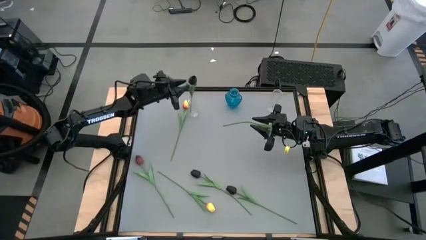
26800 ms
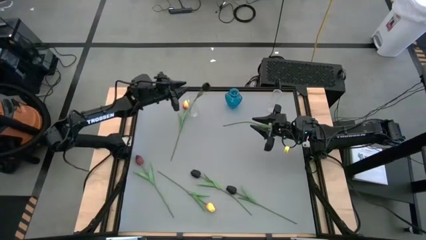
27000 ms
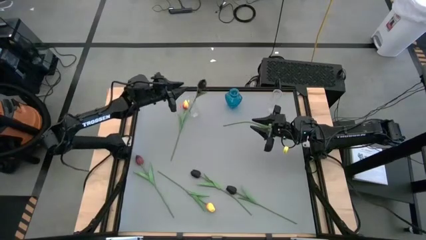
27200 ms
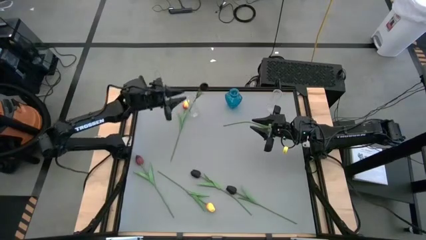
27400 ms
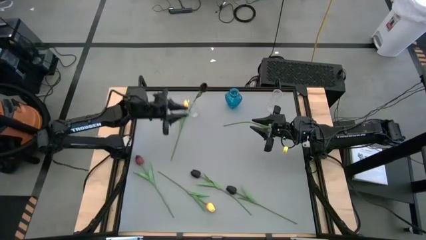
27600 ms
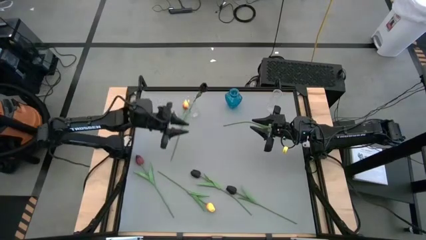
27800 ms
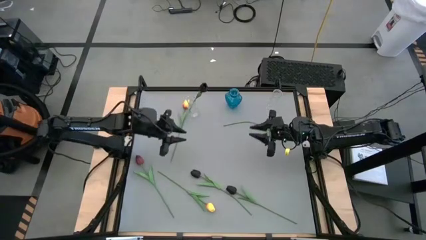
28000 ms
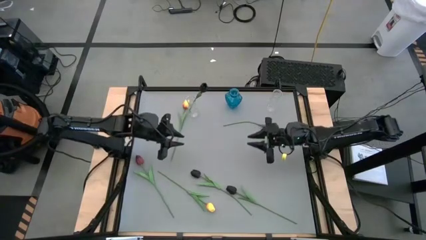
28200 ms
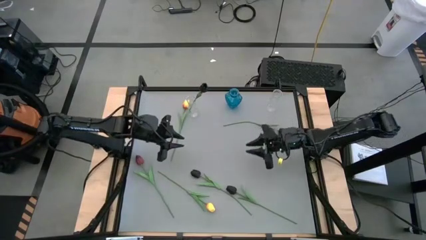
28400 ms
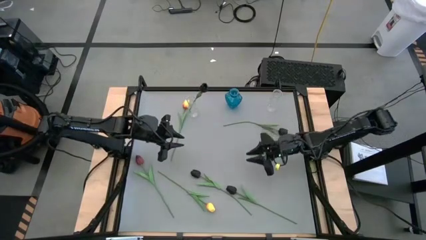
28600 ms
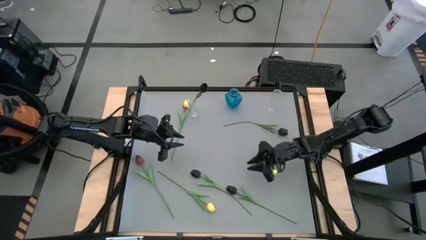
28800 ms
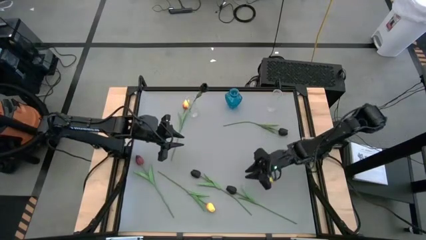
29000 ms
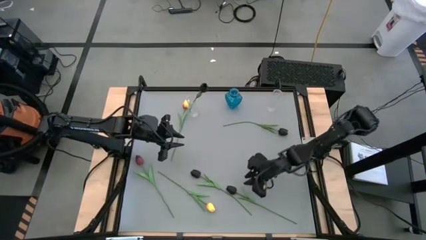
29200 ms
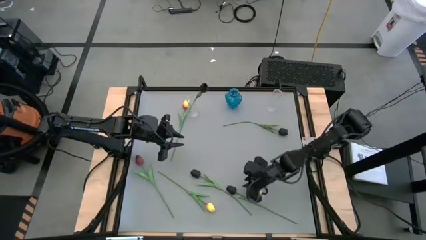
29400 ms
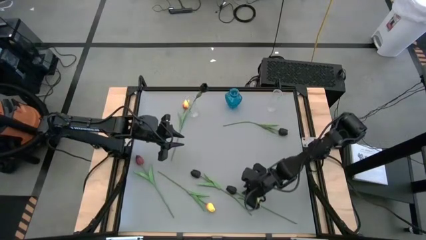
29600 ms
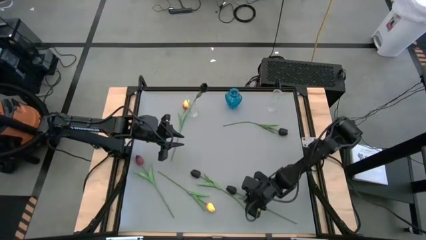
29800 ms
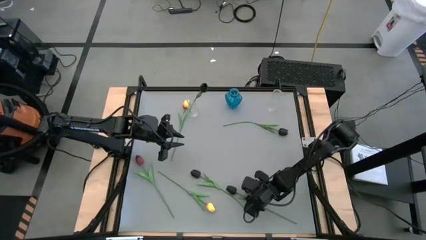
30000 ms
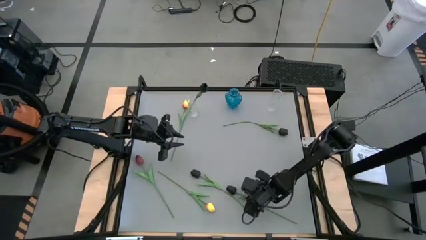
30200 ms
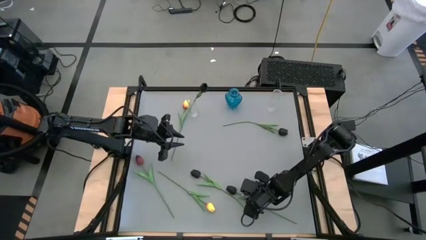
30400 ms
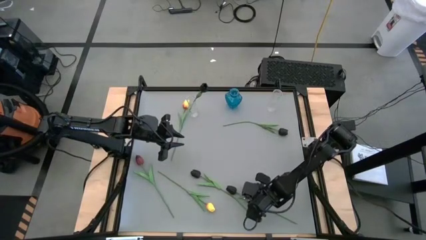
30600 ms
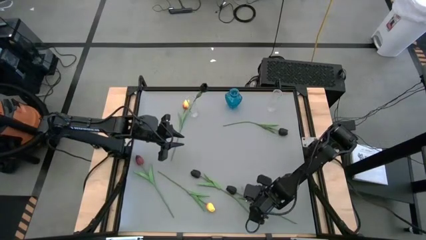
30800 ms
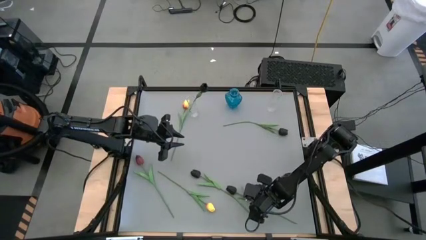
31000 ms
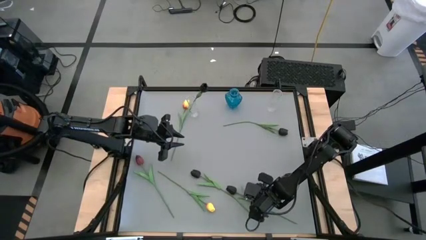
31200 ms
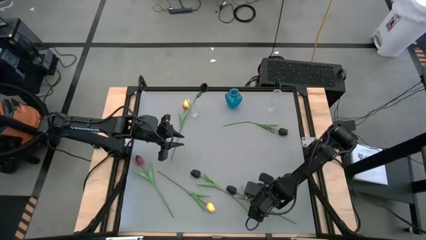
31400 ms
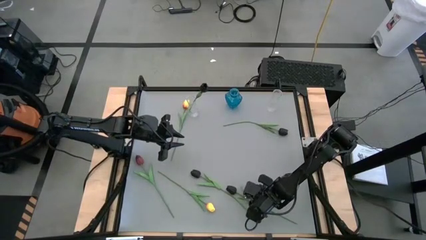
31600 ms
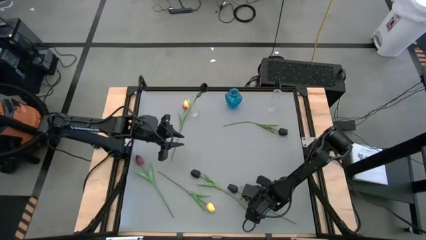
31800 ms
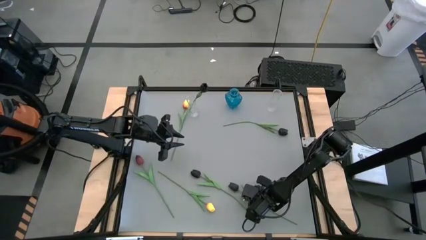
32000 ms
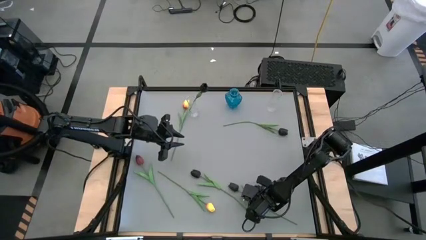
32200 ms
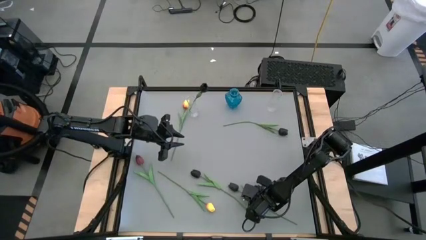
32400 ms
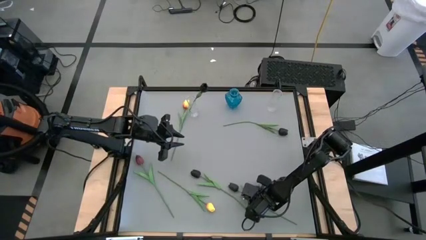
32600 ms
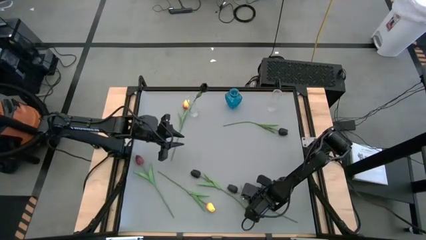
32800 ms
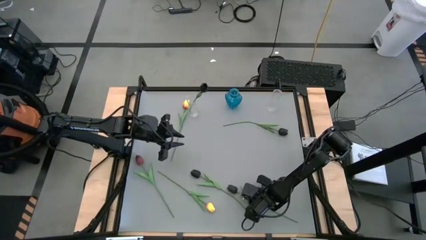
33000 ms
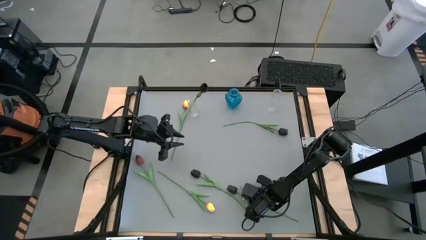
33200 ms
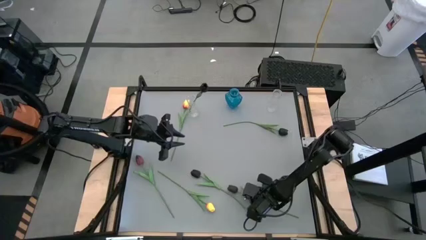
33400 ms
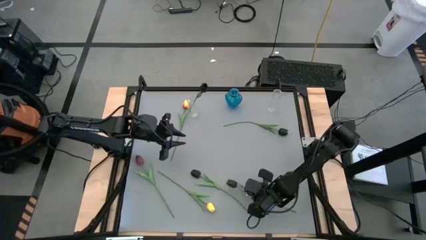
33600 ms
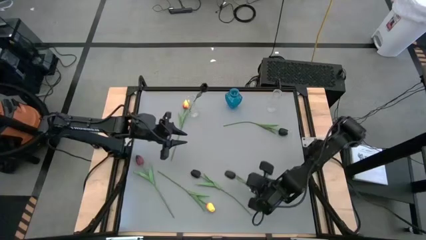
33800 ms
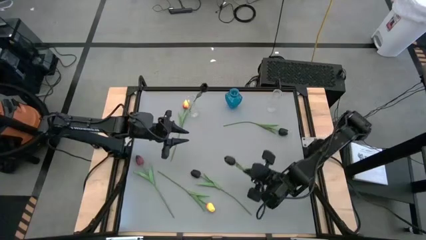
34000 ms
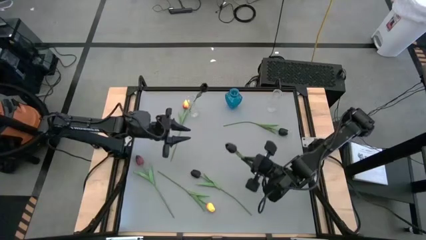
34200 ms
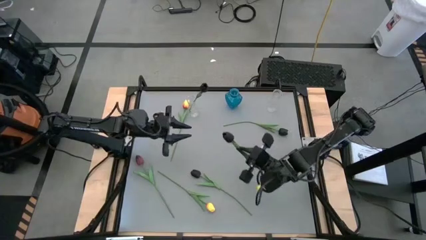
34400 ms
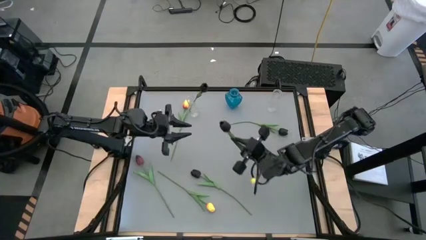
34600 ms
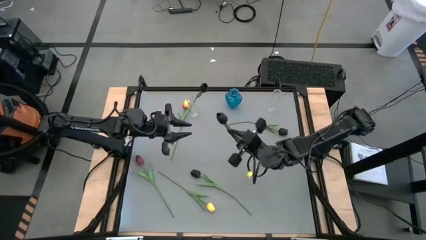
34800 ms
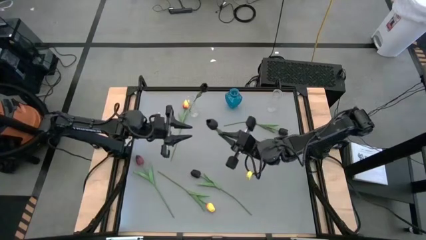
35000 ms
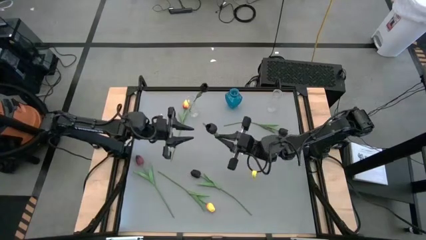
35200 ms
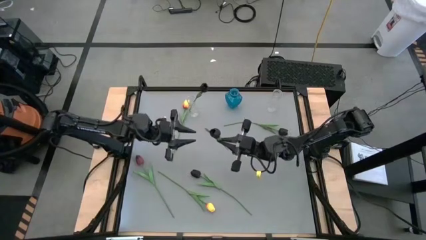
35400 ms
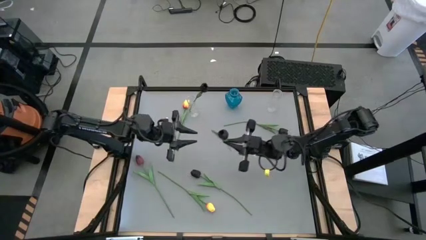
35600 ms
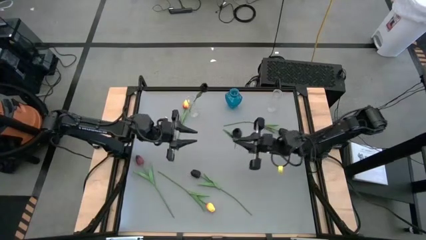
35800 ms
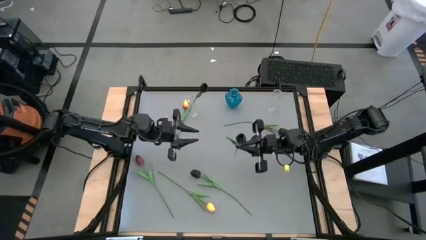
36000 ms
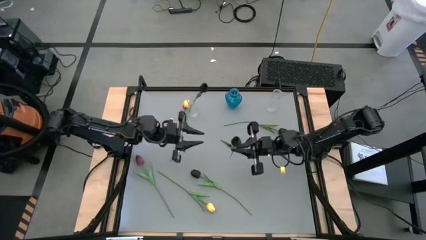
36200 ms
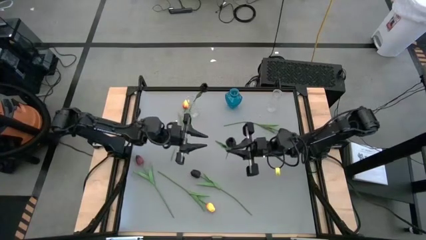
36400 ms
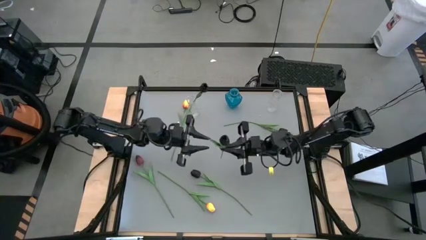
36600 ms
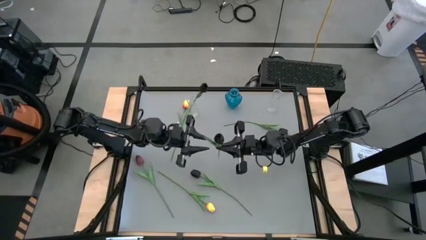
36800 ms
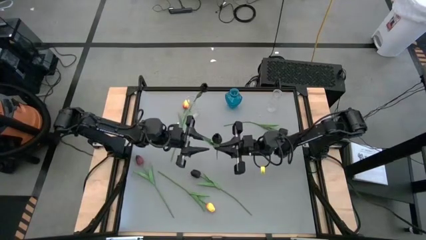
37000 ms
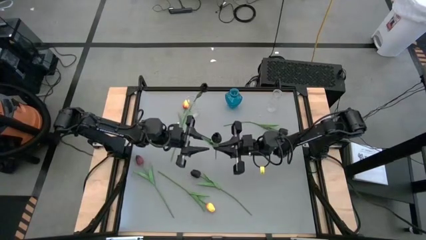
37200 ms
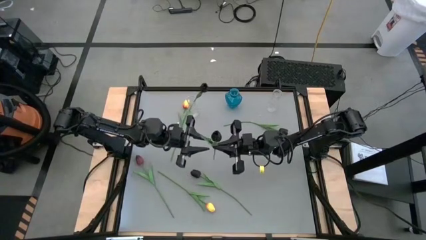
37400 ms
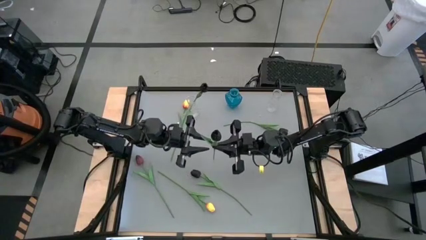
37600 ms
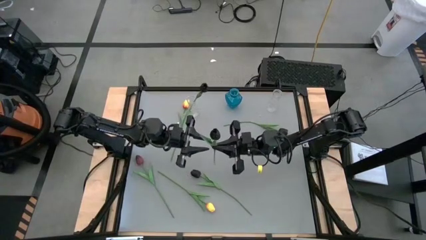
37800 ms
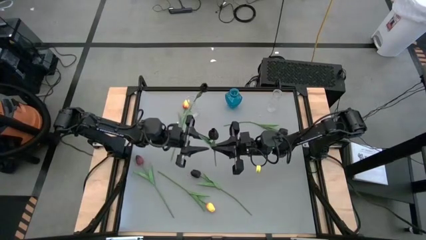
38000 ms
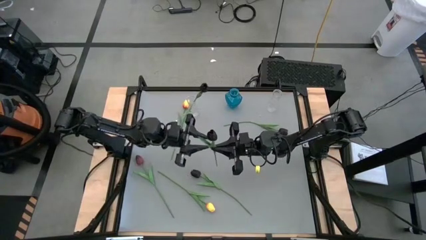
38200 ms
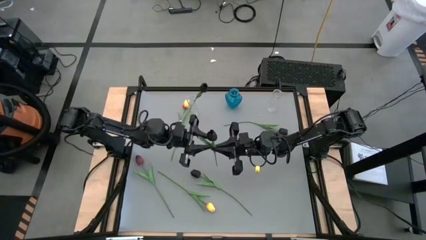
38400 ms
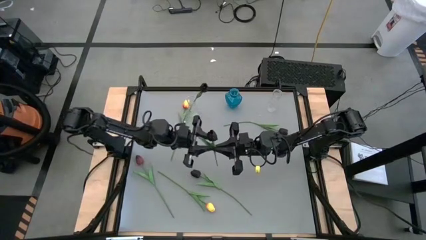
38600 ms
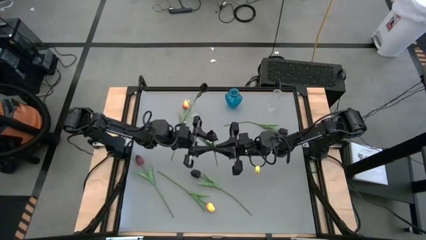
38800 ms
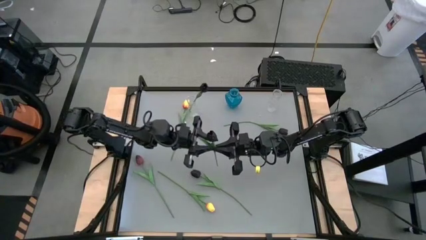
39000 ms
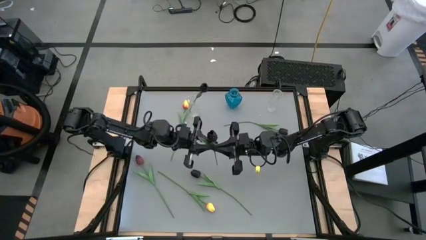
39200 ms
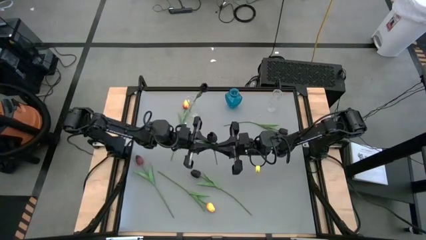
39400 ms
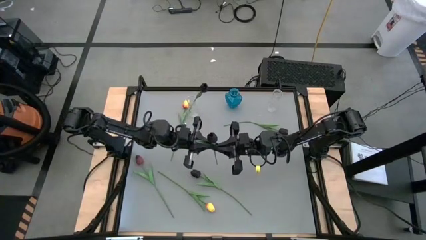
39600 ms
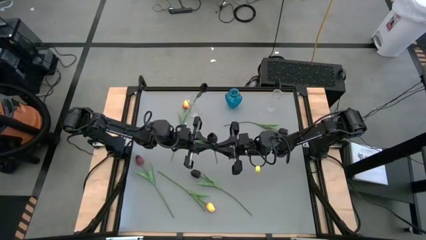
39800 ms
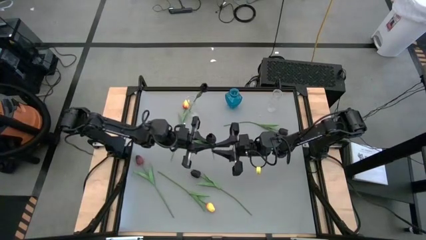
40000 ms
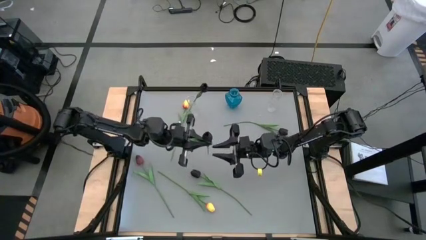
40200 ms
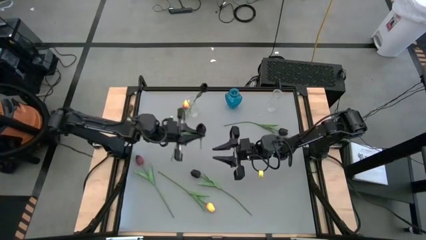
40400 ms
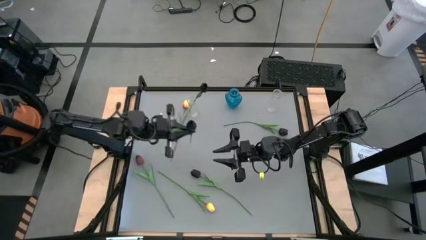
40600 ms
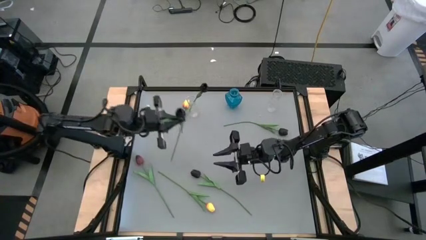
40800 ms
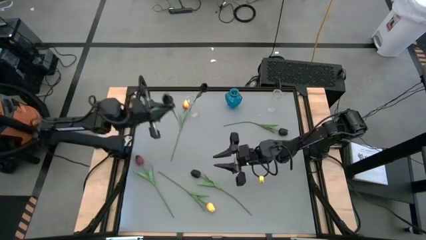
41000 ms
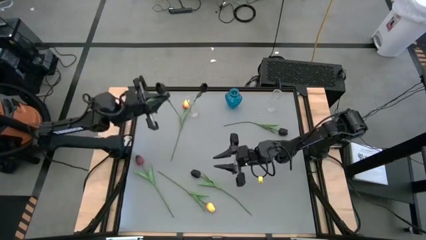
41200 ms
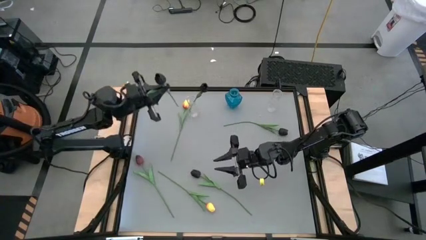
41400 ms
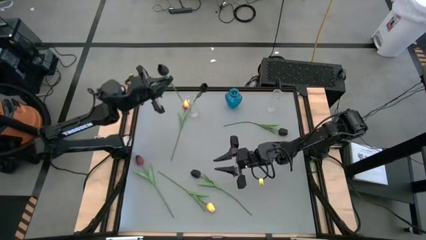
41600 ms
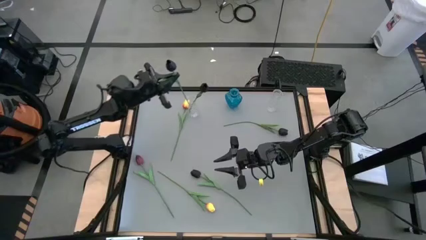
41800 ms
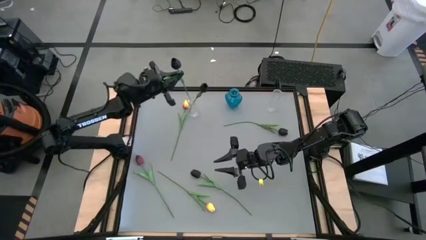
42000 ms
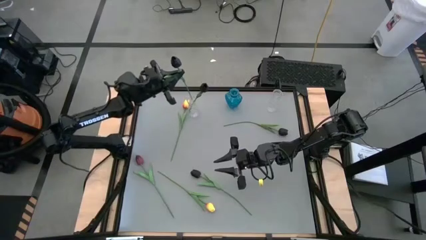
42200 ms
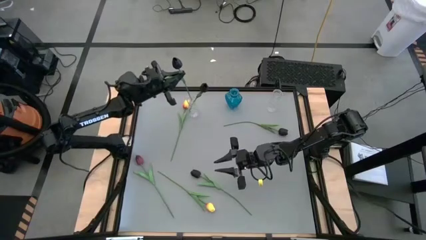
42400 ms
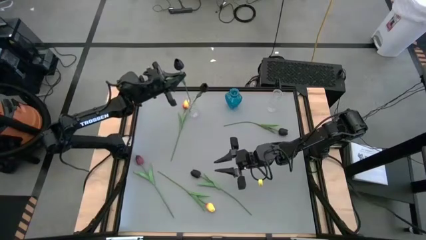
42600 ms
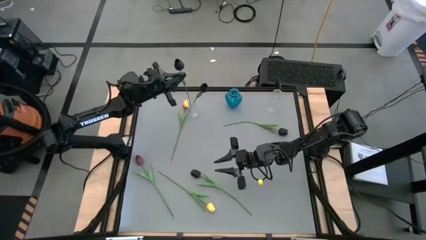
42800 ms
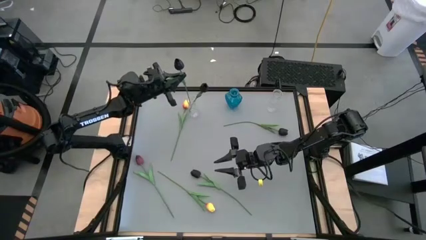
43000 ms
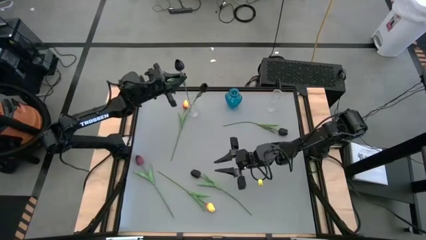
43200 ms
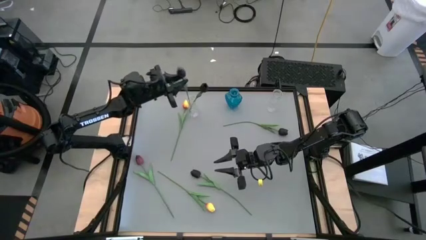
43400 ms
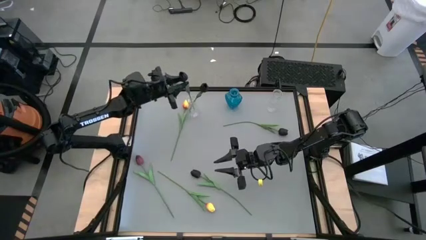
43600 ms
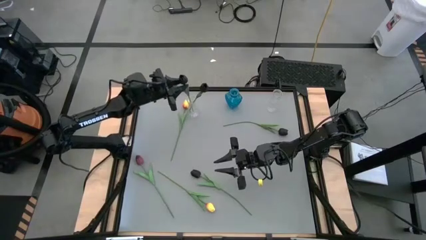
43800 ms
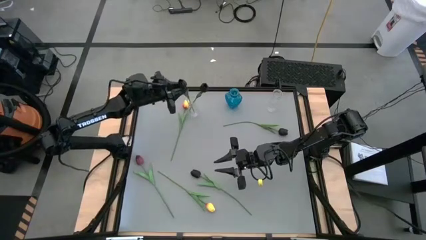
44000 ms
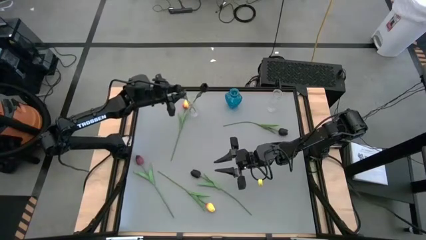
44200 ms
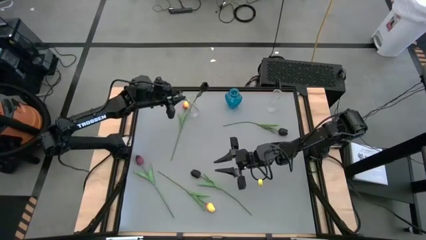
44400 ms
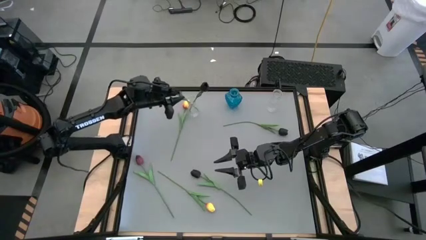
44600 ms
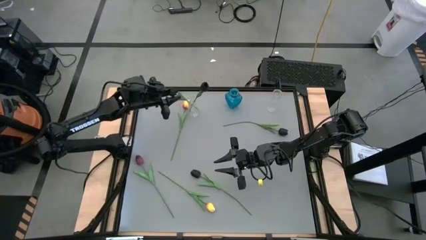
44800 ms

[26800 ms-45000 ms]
Task: Sort flowers into vase by color
Put the black flower into the left transparent flower vase
